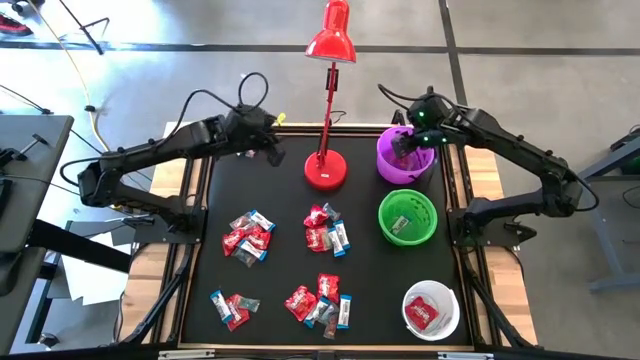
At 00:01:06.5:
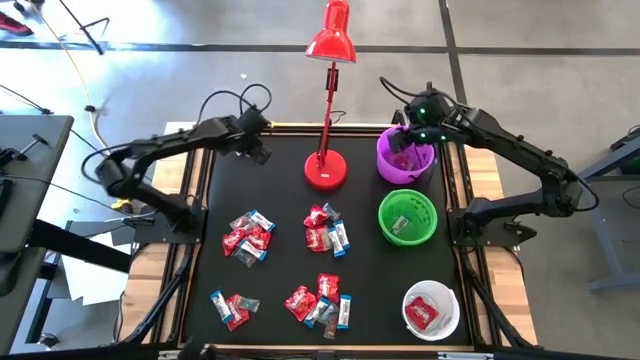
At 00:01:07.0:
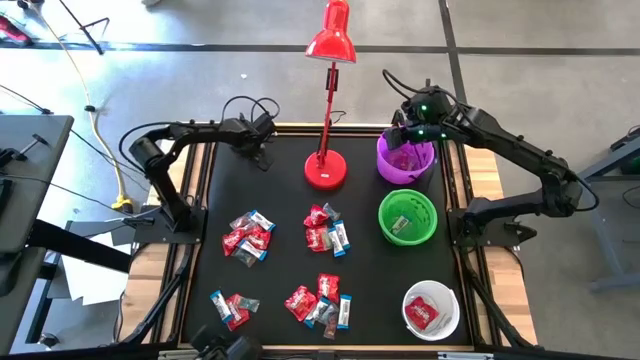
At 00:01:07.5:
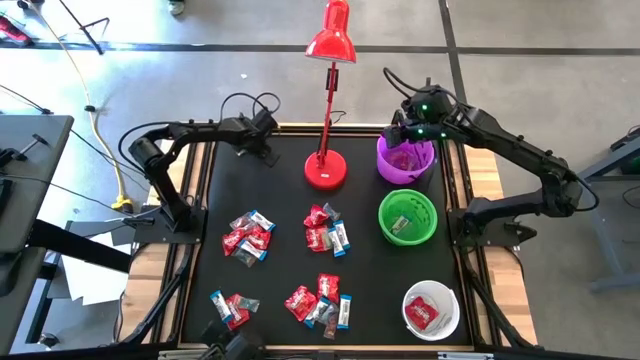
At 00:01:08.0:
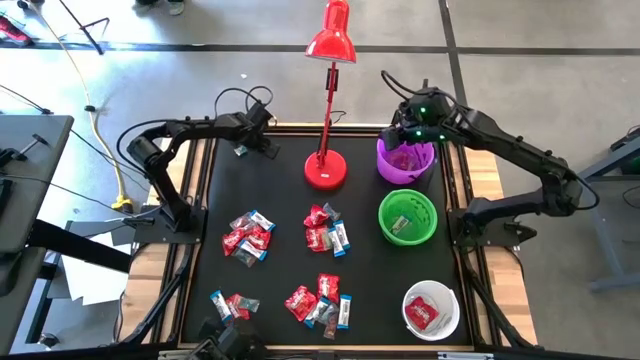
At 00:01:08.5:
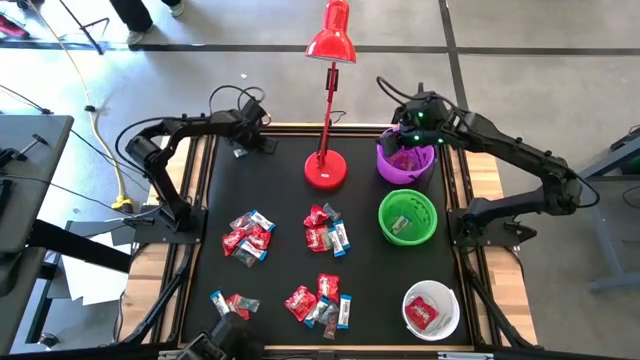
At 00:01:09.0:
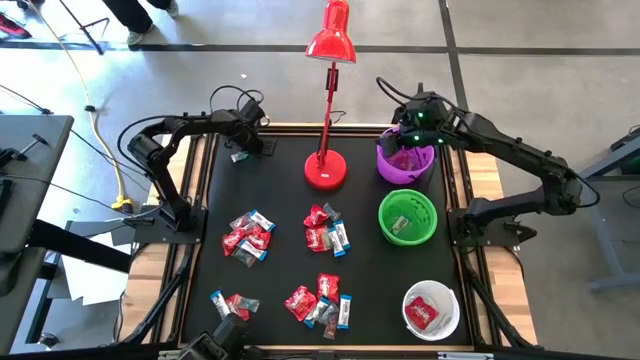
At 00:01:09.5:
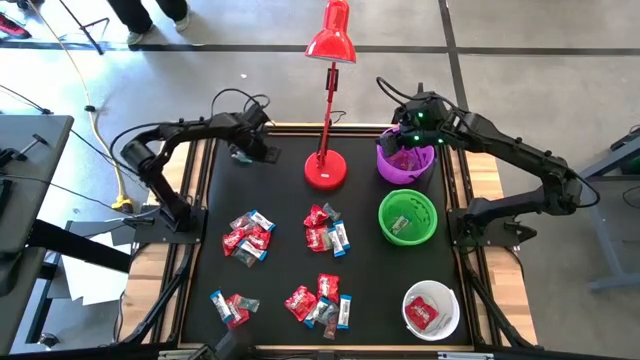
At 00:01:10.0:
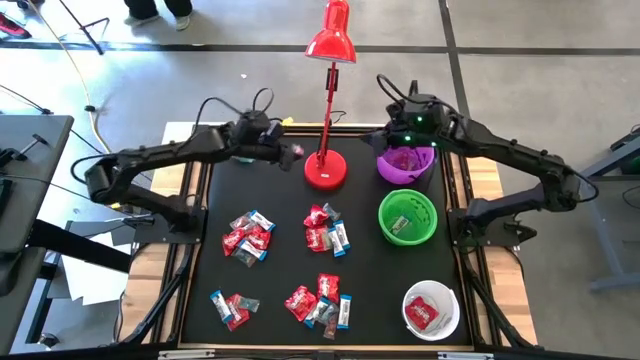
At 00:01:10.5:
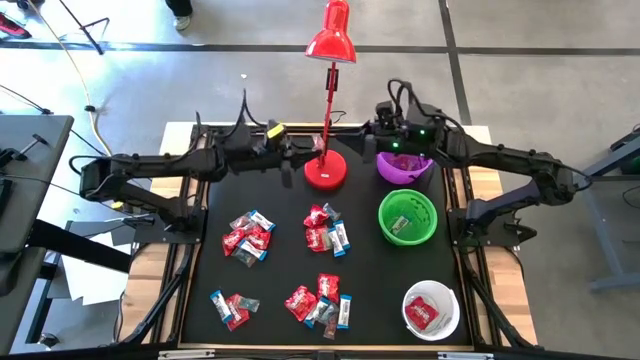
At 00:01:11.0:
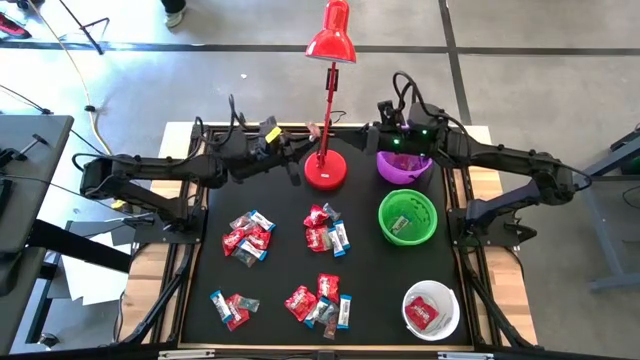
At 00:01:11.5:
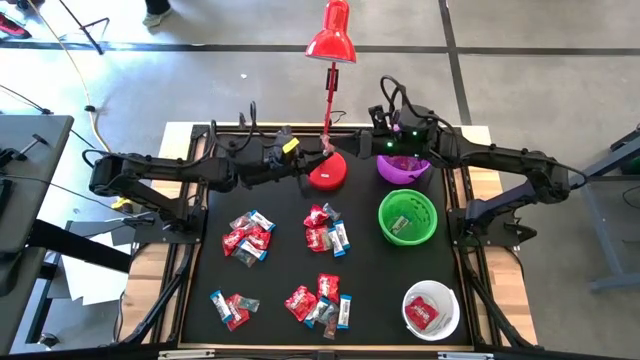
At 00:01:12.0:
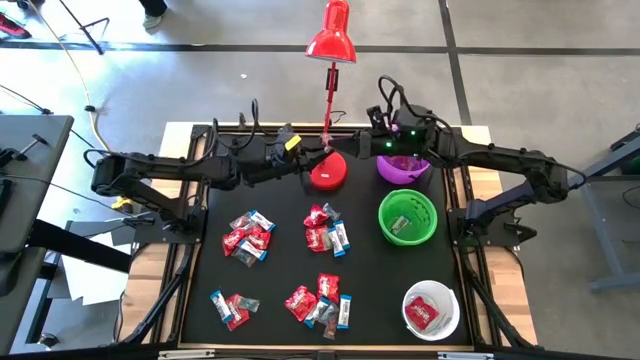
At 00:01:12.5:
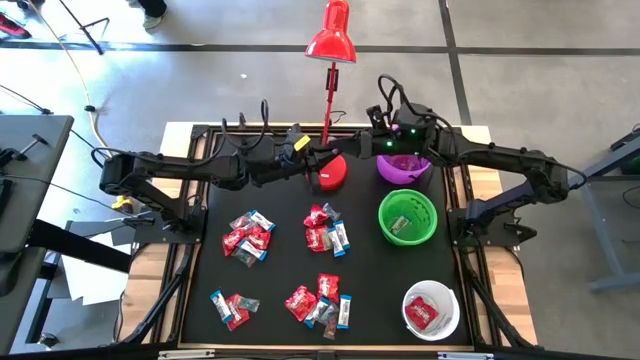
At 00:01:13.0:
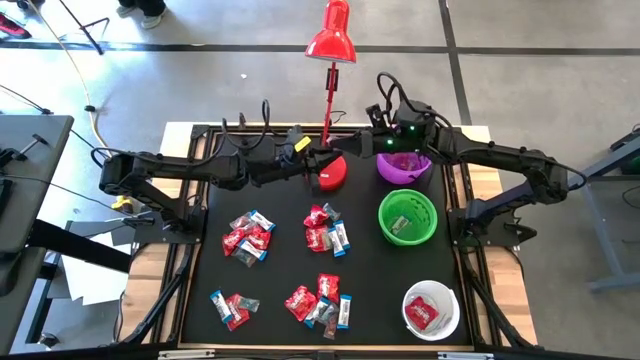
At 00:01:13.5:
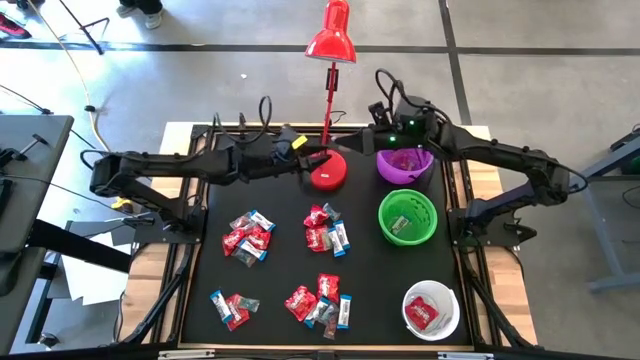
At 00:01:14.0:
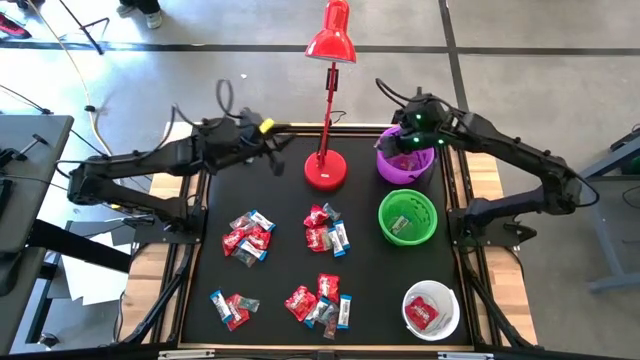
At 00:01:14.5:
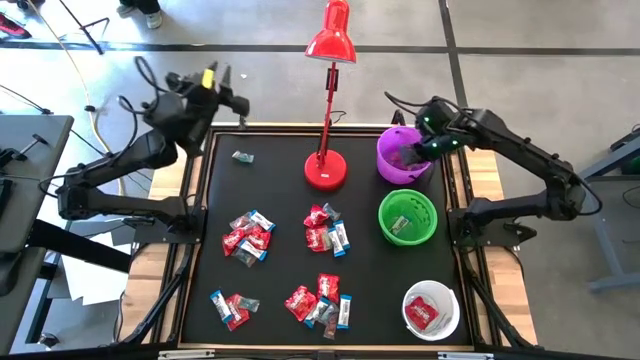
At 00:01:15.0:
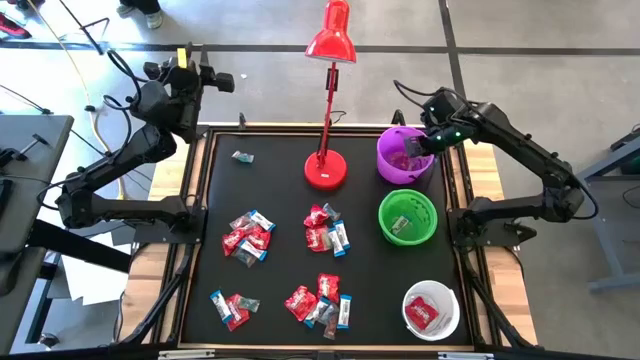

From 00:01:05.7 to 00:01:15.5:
Task: Organize candy in baskets
Put the orange gummy into the violet bucket

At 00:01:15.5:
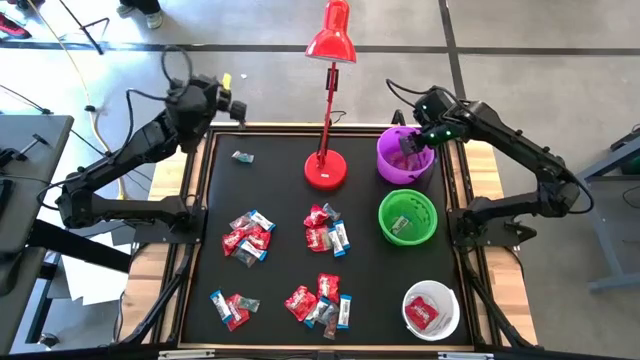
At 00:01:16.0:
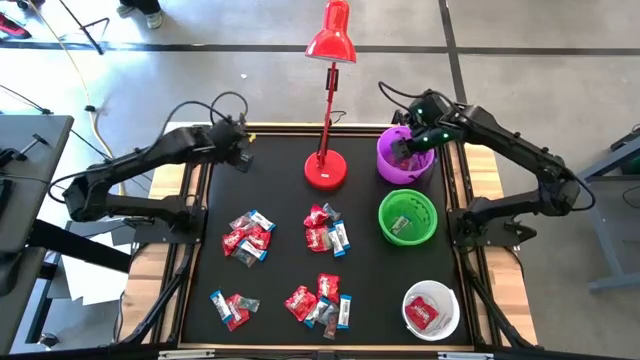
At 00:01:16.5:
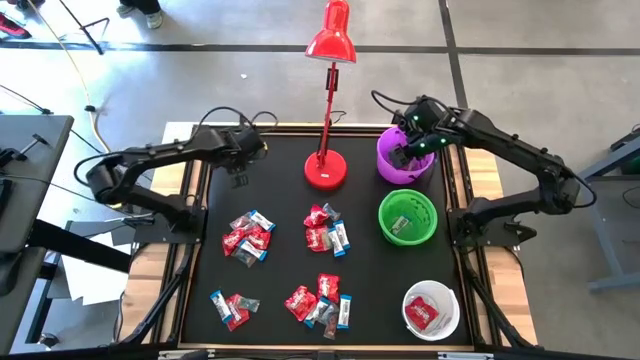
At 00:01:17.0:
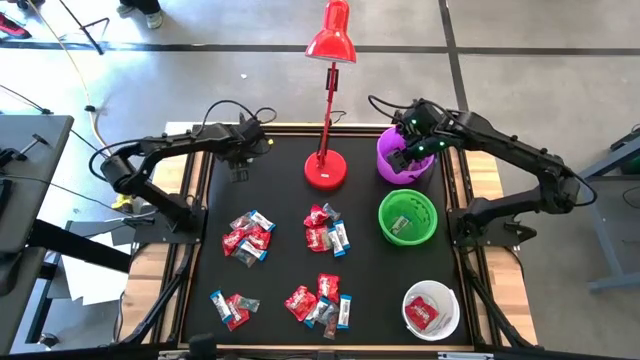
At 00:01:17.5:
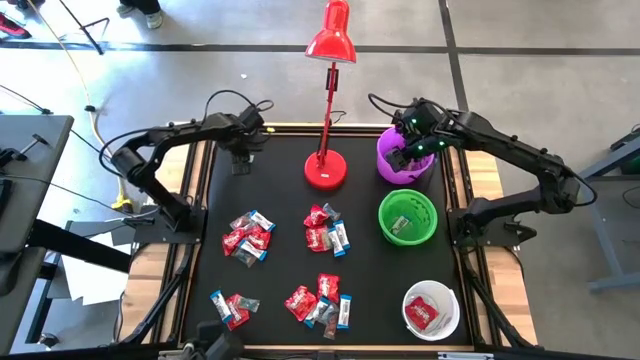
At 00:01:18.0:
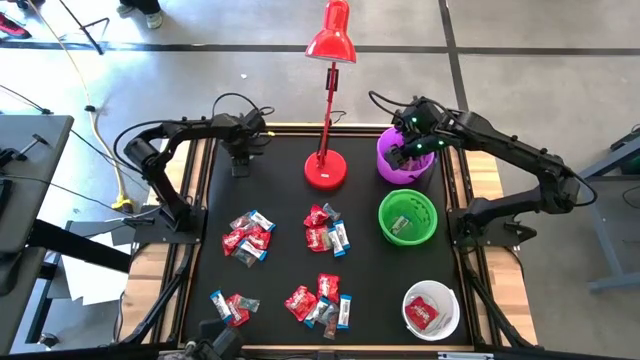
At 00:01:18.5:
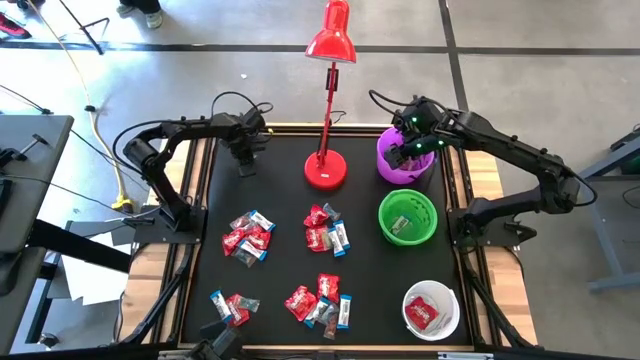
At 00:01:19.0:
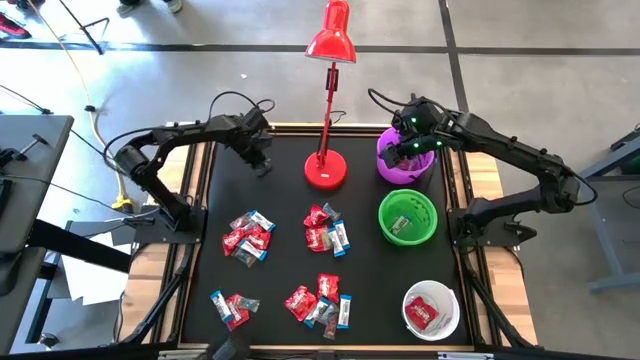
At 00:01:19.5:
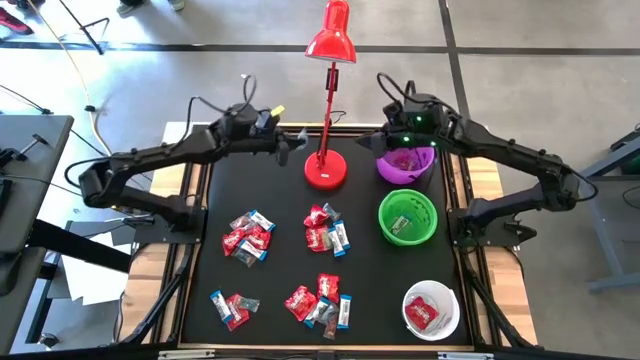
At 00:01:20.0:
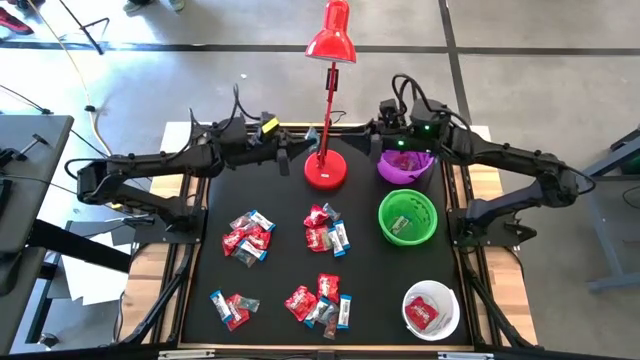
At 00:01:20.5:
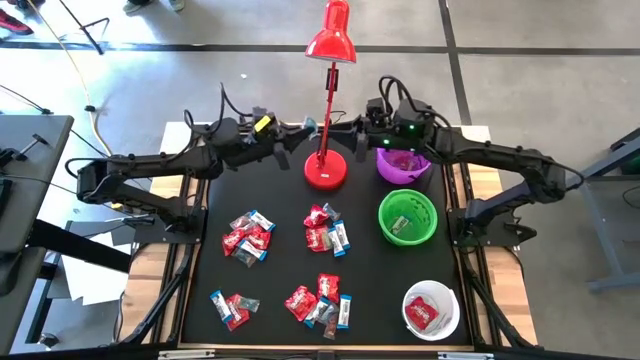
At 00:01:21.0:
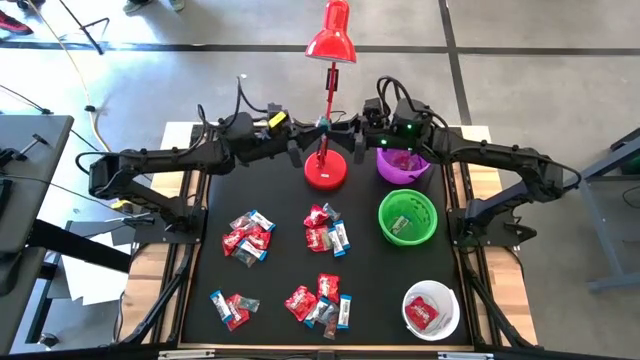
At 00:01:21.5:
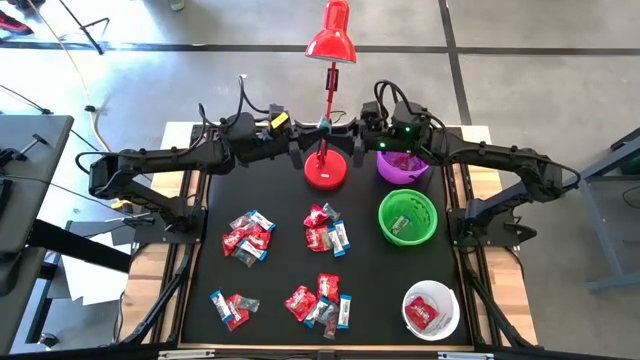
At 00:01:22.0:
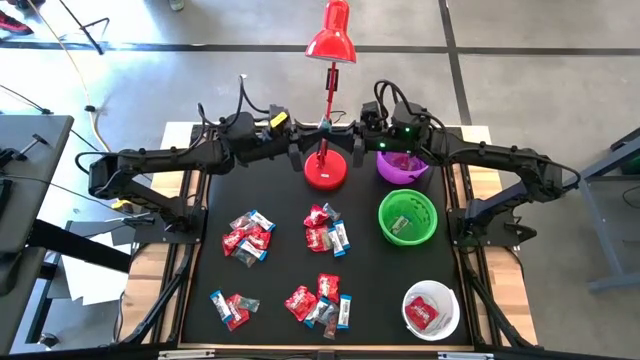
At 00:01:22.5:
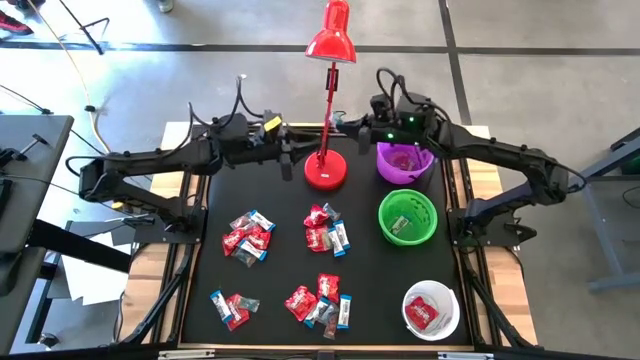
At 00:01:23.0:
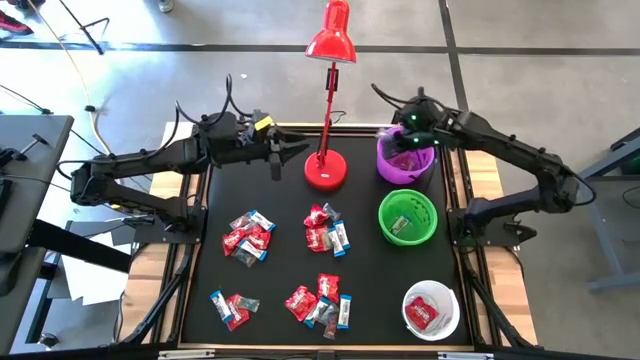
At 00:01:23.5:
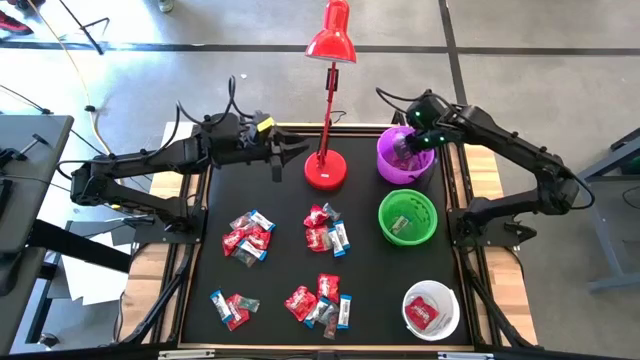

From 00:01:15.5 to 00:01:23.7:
Put the blue gummy into the violet bucket

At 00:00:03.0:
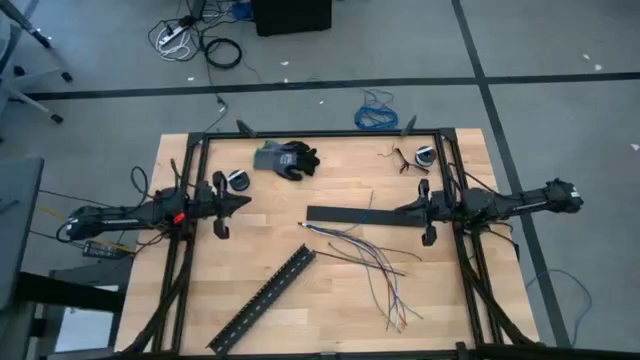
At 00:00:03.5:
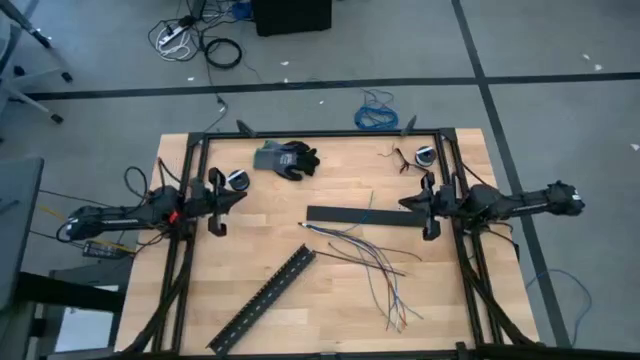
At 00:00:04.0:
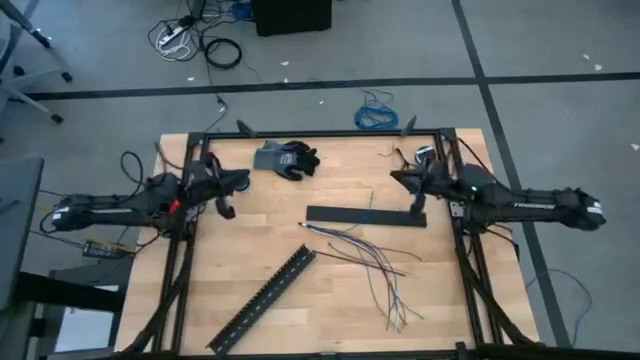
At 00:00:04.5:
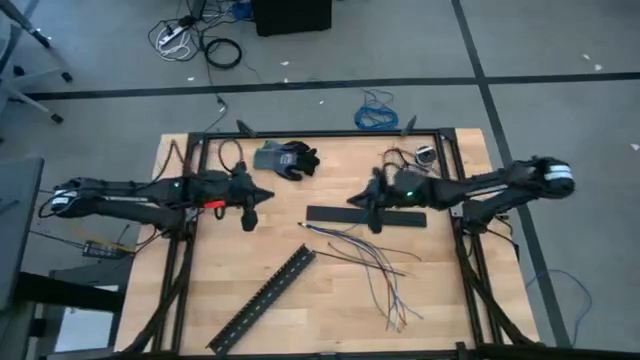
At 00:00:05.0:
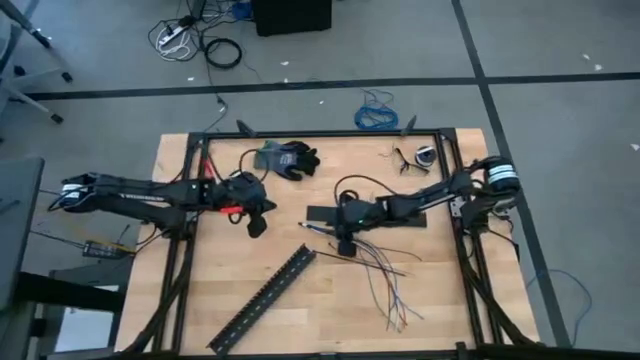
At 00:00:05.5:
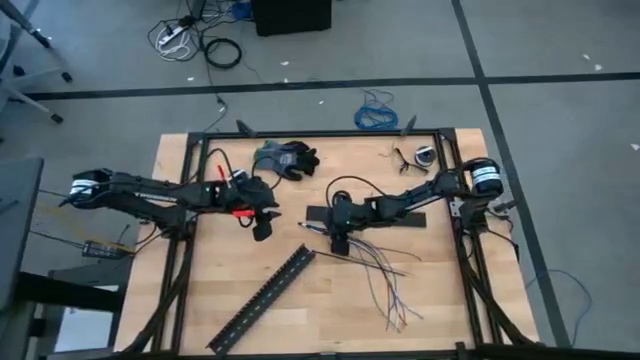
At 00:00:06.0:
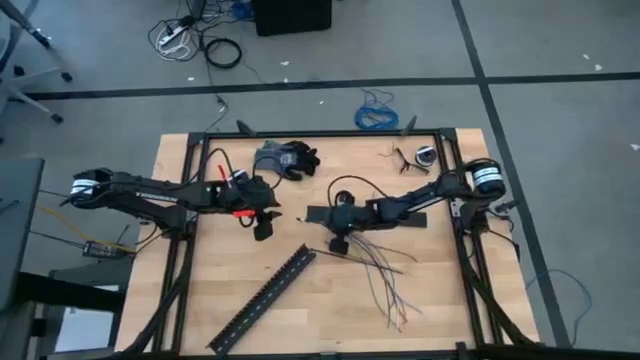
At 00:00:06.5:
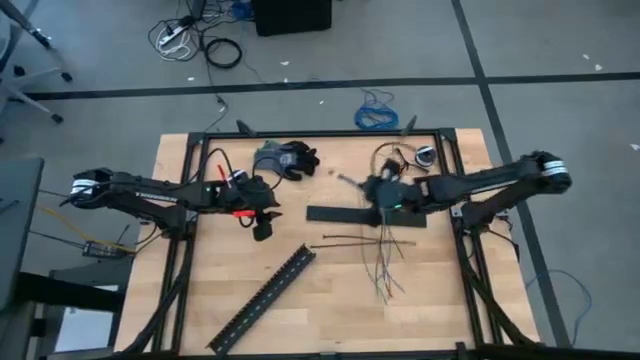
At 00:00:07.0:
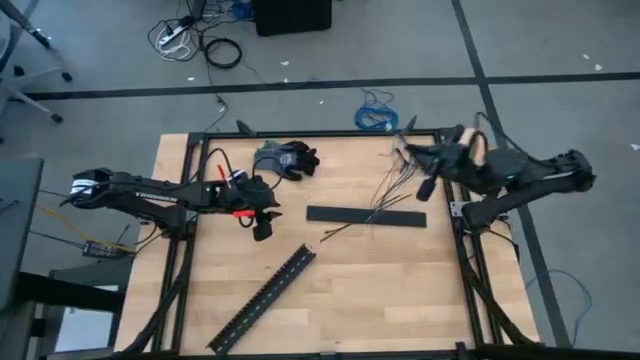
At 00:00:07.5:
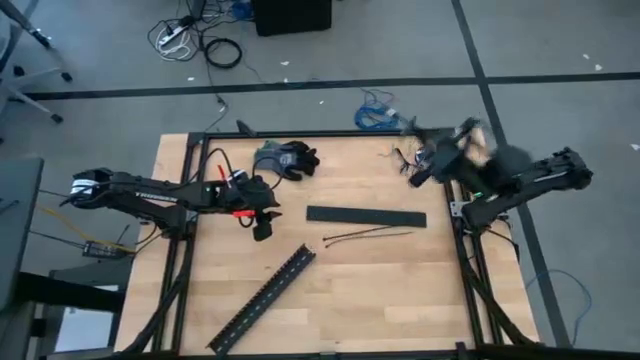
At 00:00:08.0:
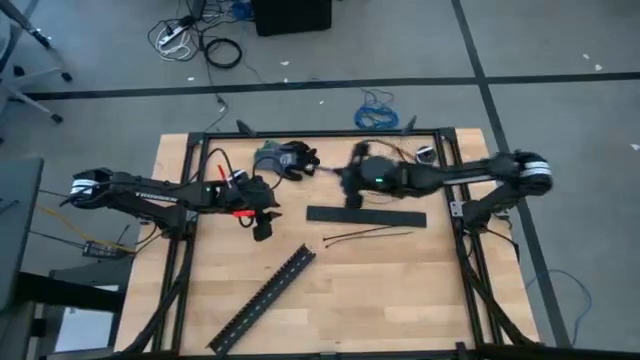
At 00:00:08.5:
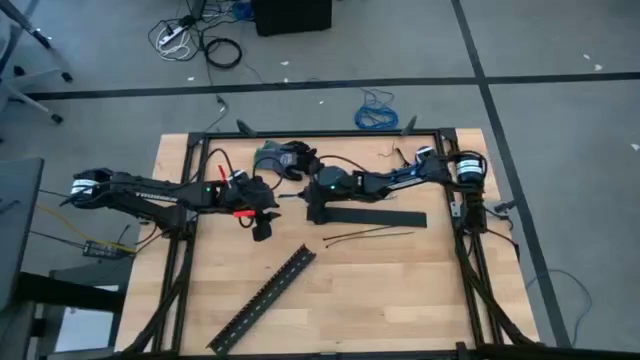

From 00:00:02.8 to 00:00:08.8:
Task: Ziptie cables
Move the cable wires on the top center of the table
